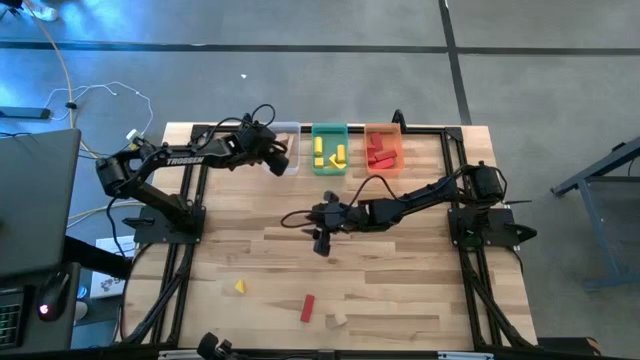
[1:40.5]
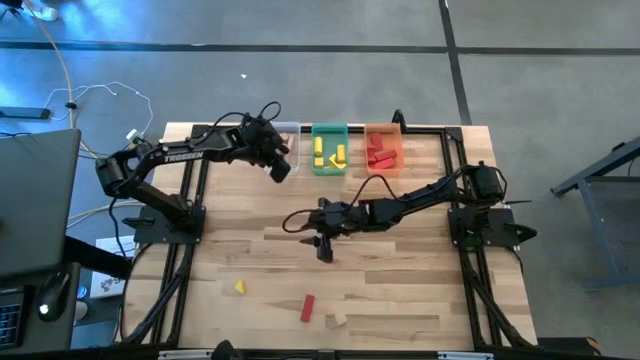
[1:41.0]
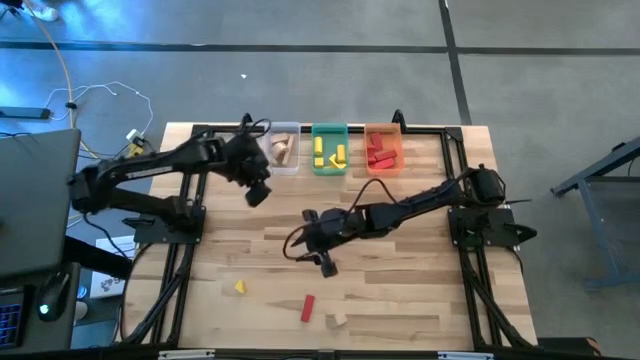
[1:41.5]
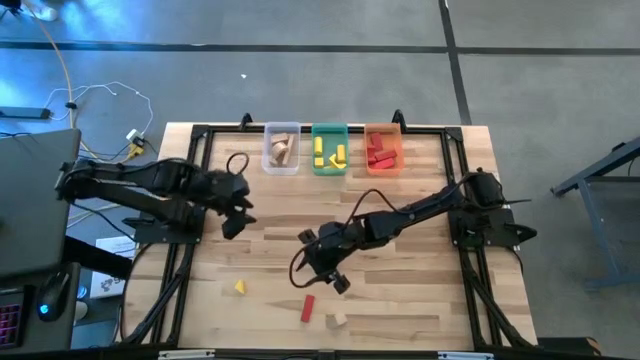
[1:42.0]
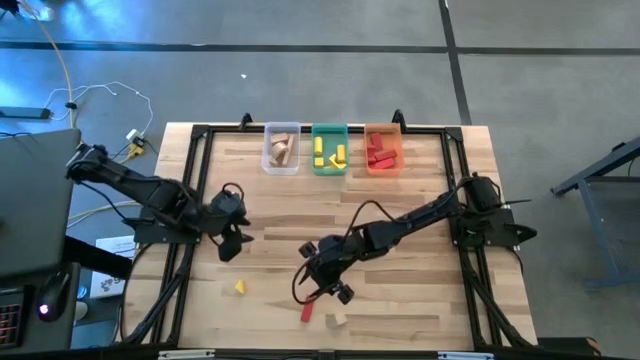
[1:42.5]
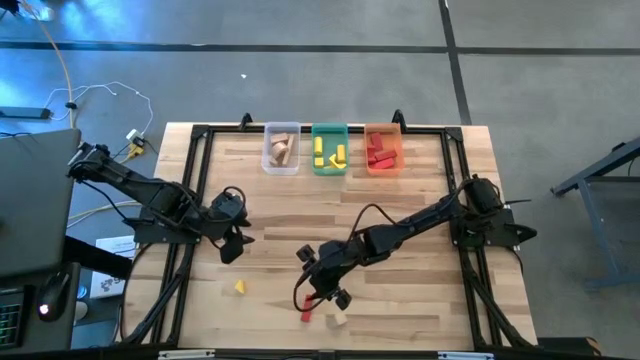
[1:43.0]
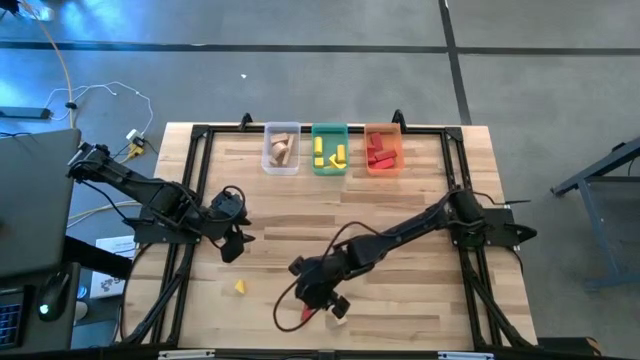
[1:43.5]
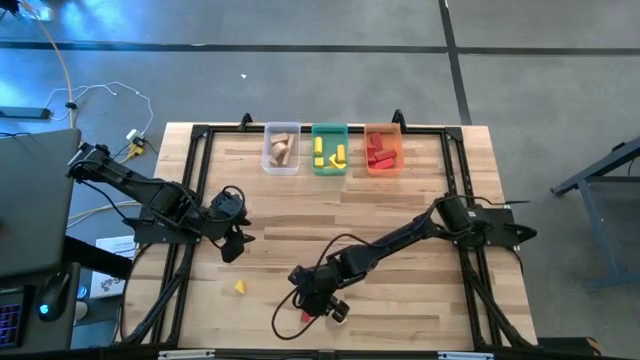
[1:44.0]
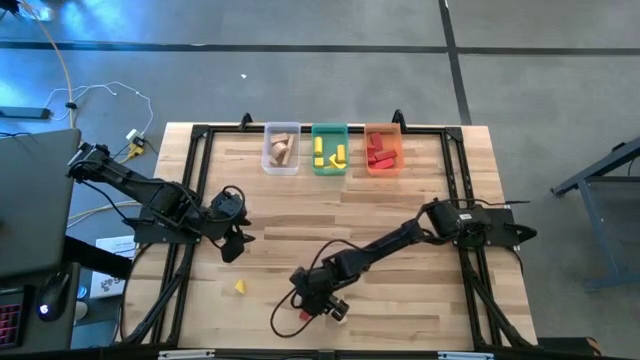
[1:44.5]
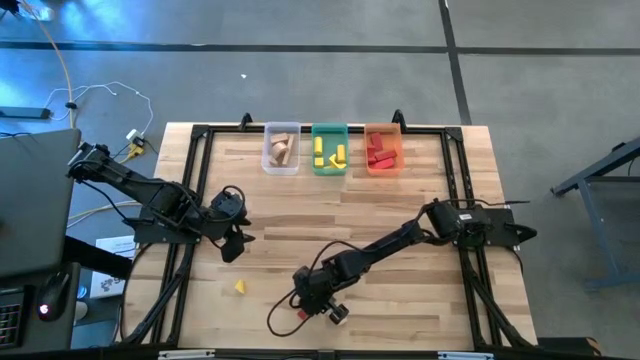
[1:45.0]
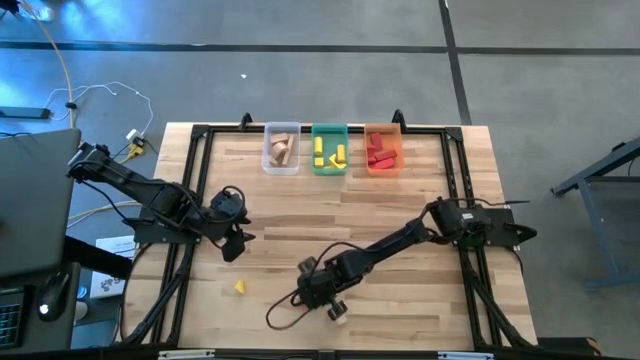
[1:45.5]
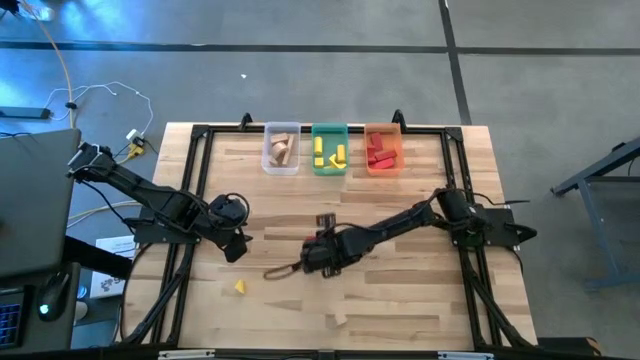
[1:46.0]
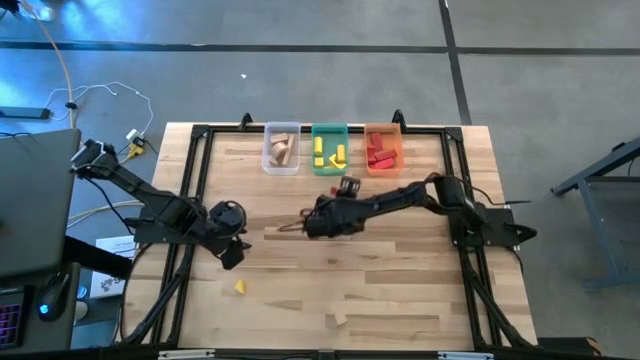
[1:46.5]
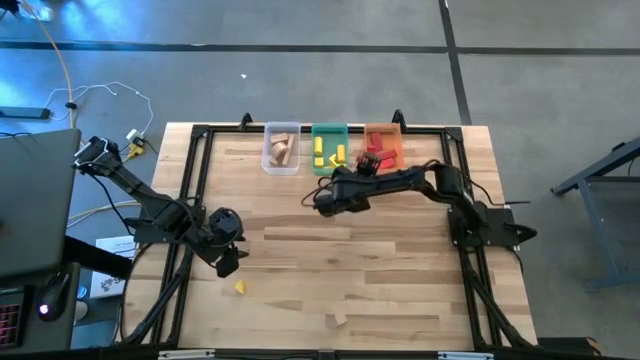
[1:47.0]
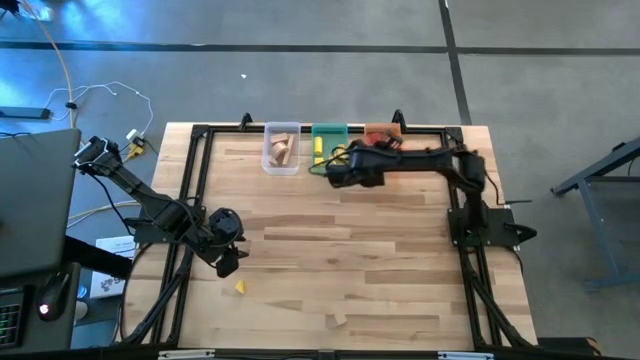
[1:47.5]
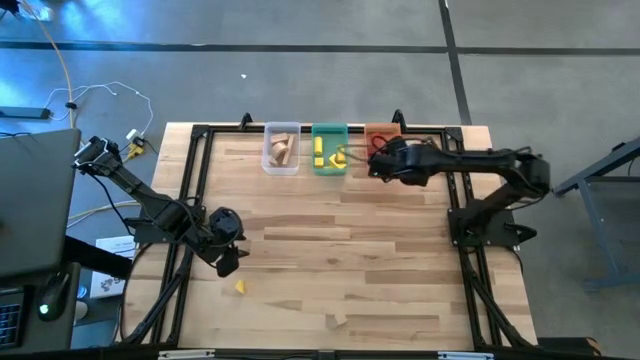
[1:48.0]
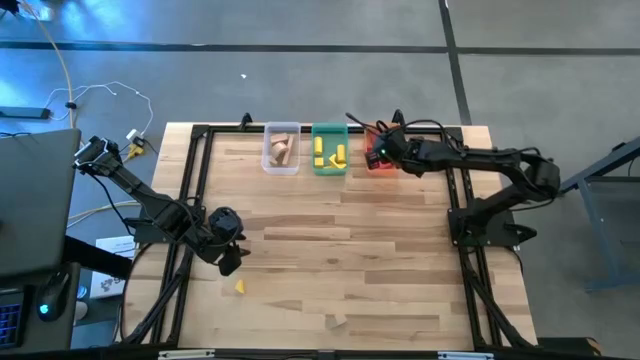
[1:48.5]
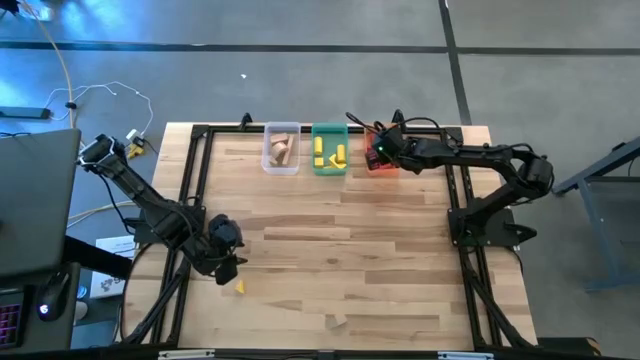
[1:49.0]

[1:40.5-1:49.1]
Task: Sort & place blocks by color
Put the red block into the orange transparent bin

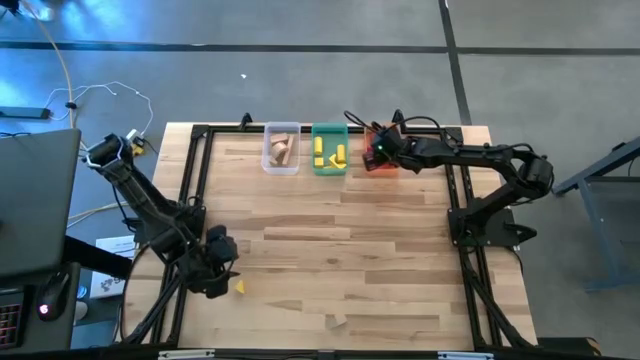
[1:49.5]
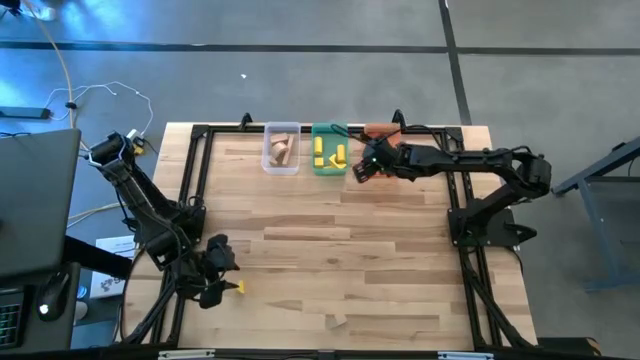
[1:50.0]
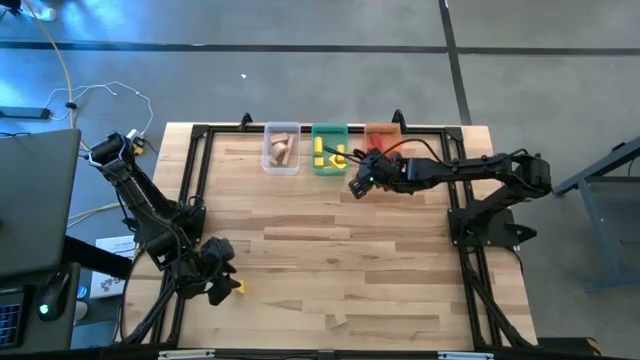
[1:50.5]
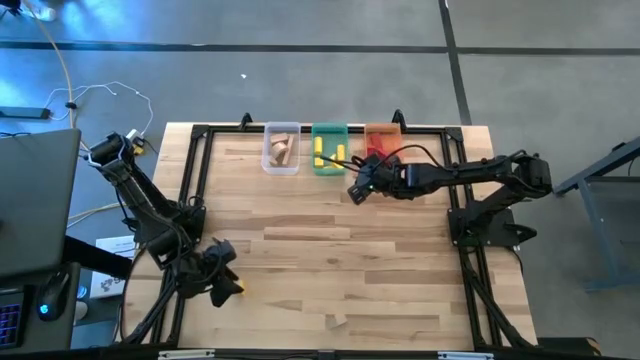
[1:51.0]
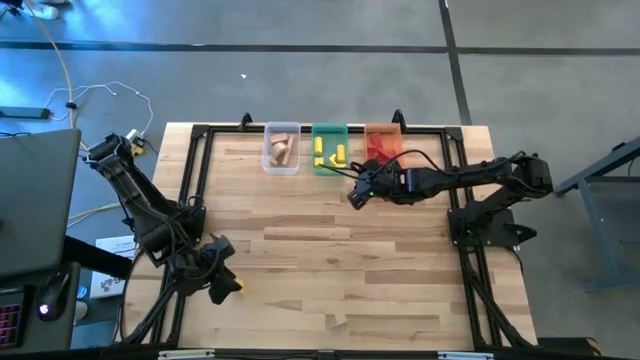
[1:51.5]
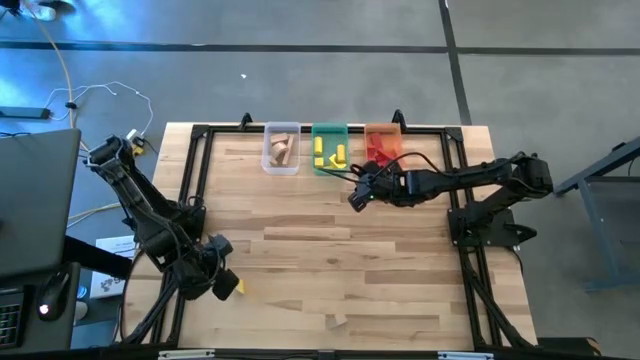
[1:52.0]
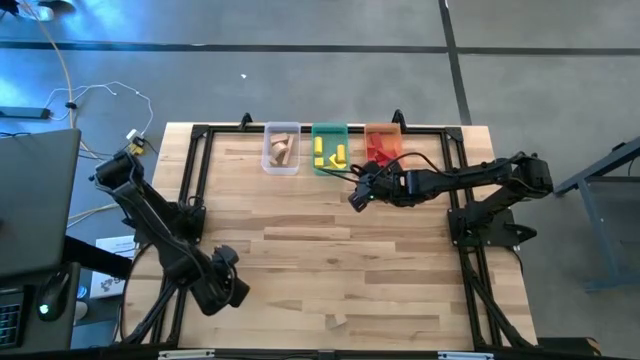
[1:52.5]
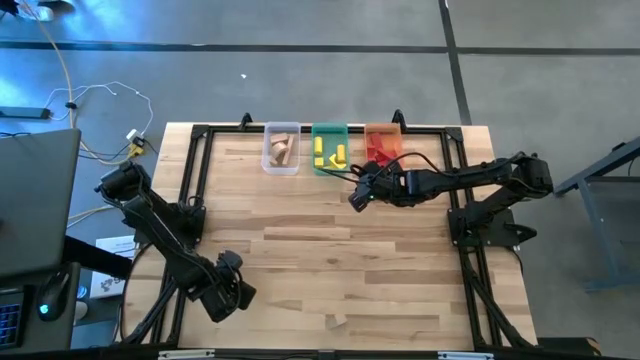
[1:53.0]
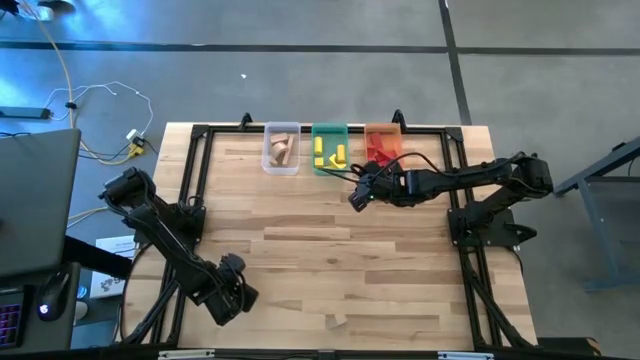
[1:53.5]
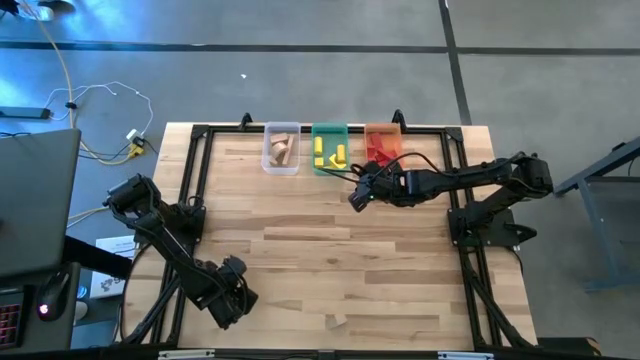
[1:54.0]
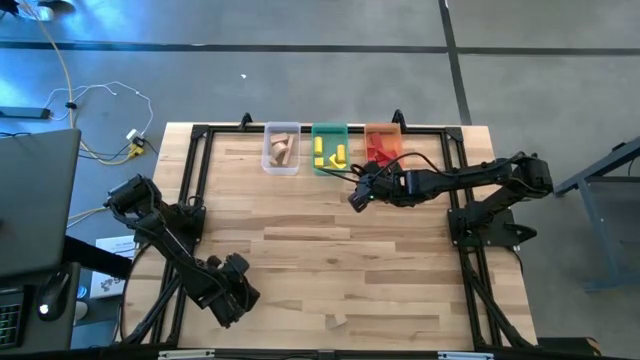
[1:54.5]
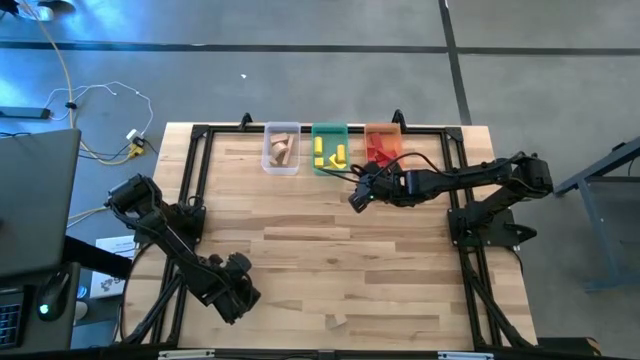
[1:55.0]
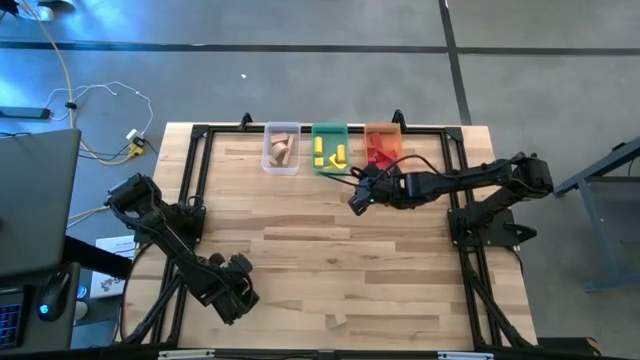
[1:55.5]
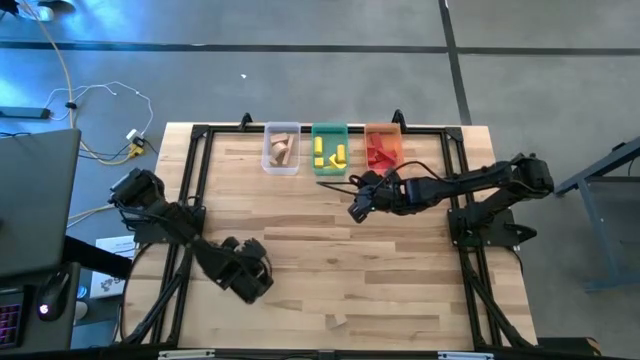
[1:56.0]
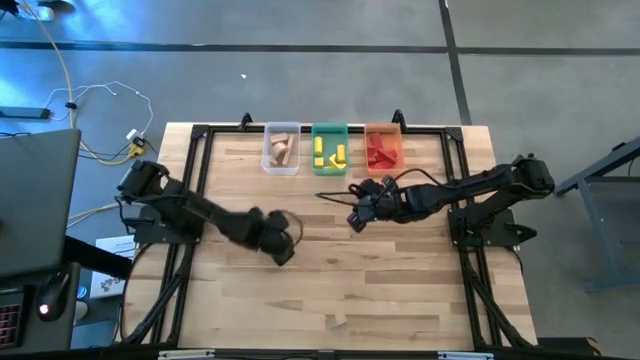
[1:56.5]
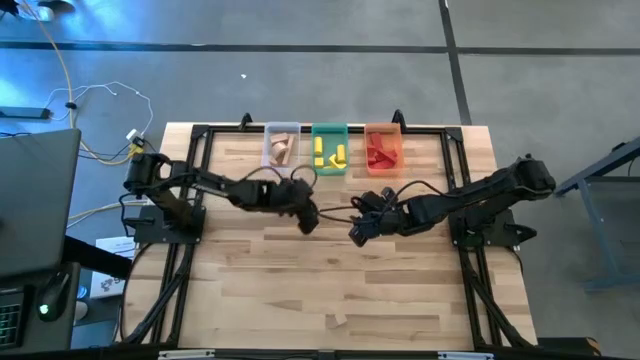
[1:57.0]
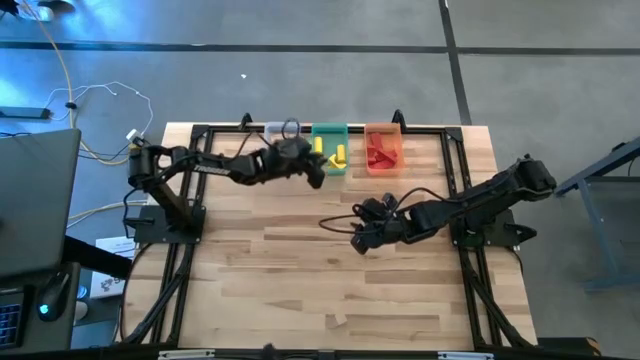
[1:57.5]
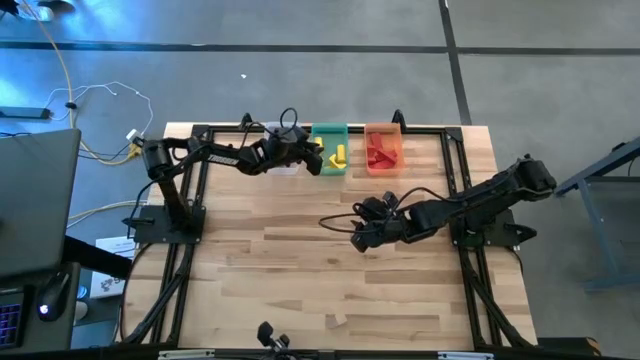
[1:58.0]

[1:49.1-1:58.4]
Put the yellow block into the green transparent bin

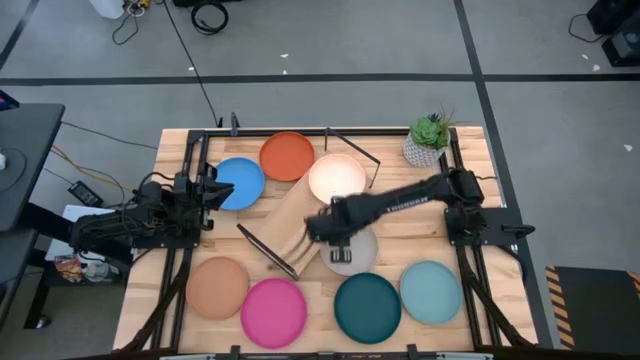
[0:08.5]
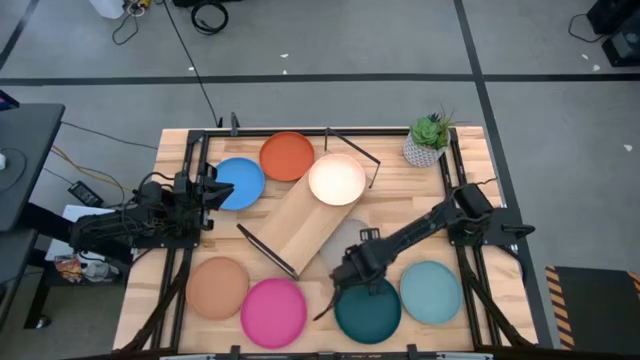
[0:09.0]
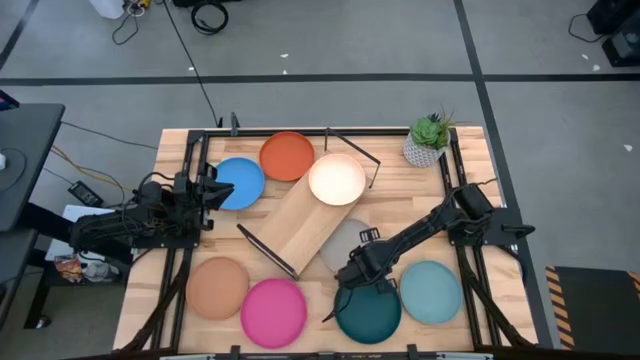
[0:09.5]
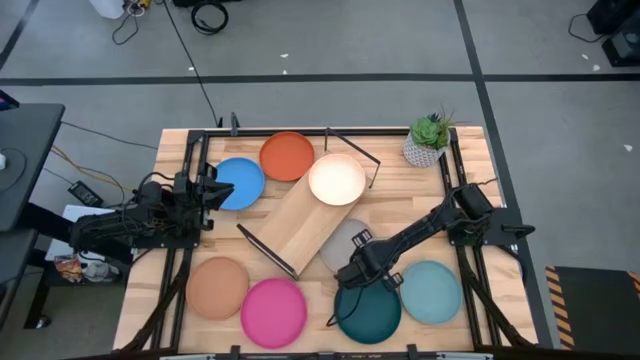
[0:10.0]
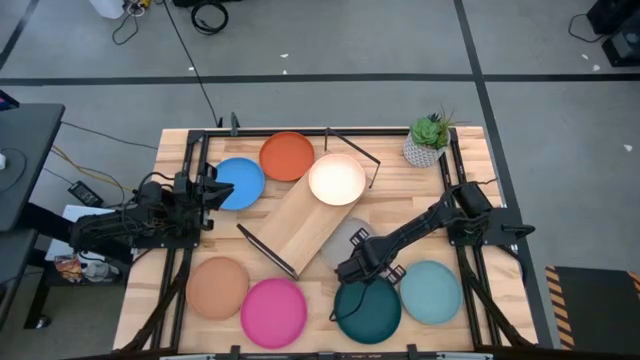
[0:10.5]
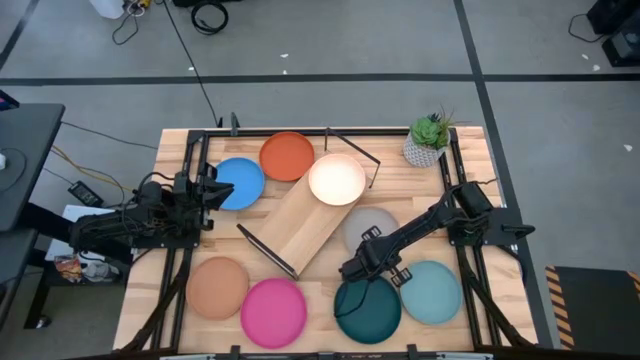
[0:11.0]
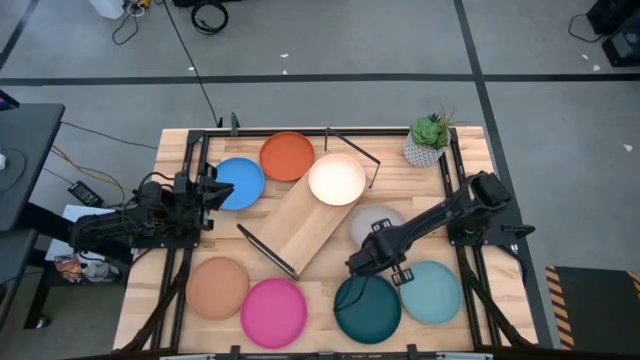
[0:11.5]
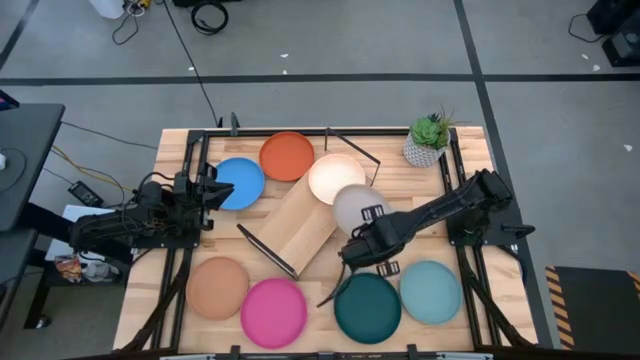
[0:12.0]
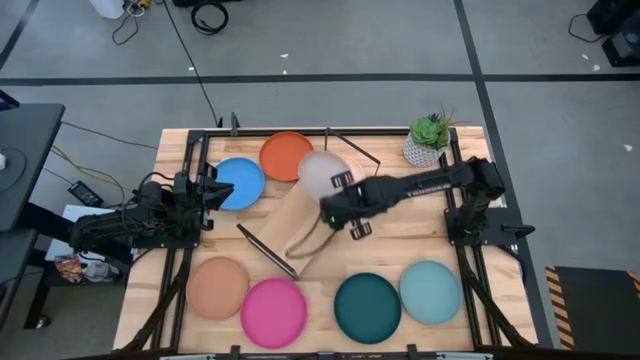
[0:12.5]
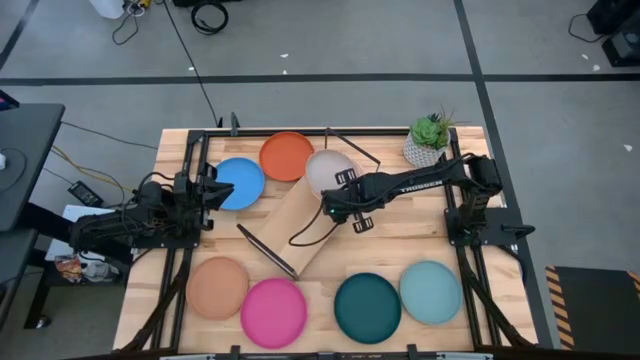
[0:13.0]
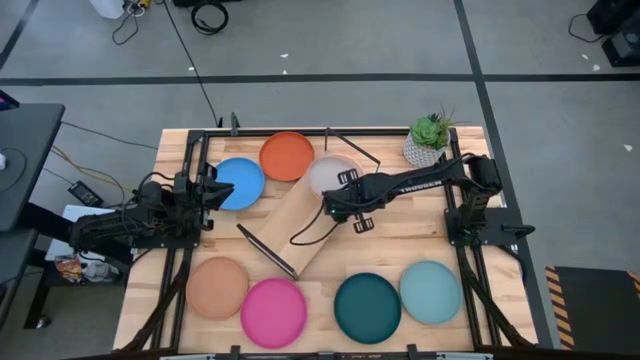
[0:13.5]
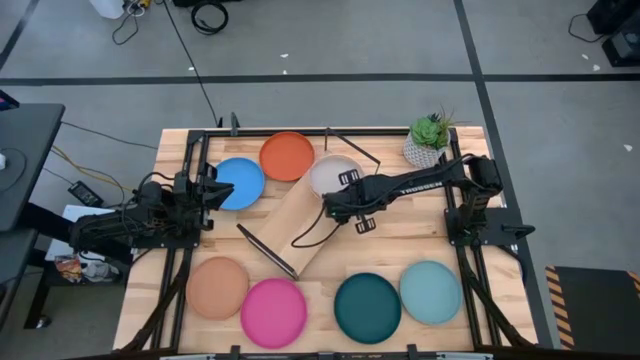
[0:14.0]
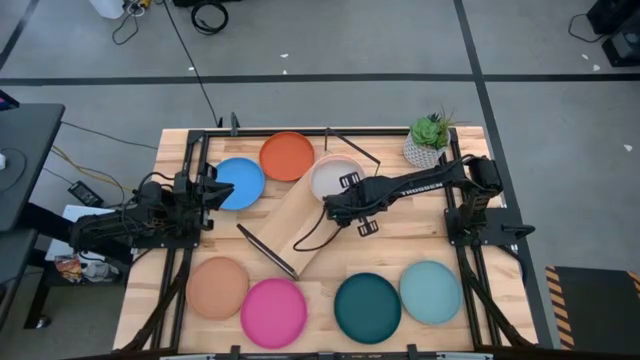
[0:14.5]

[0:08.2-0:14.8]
Task: Place and stack plates onto a shelf
Stack the gray plate on top of the beige plate on the shelf
